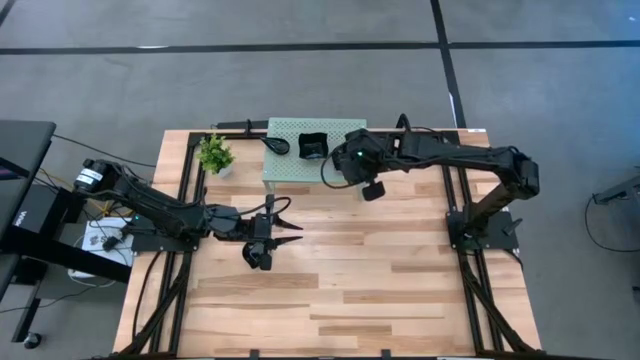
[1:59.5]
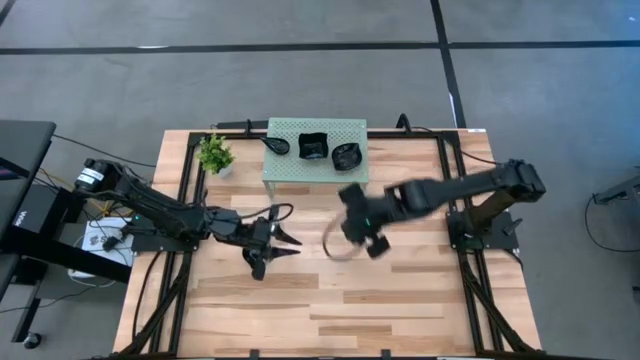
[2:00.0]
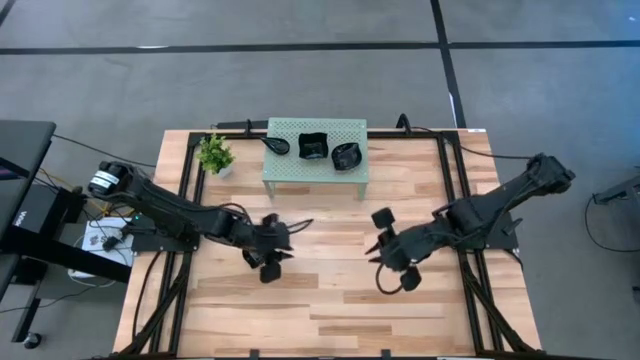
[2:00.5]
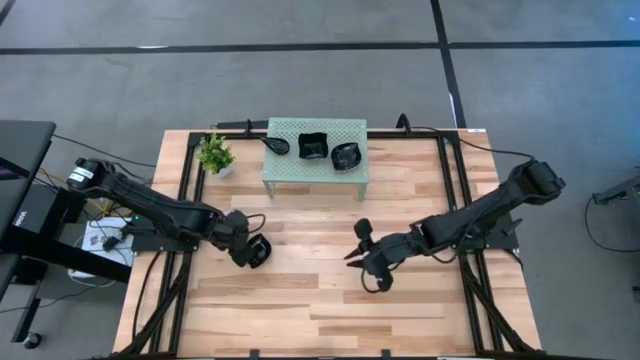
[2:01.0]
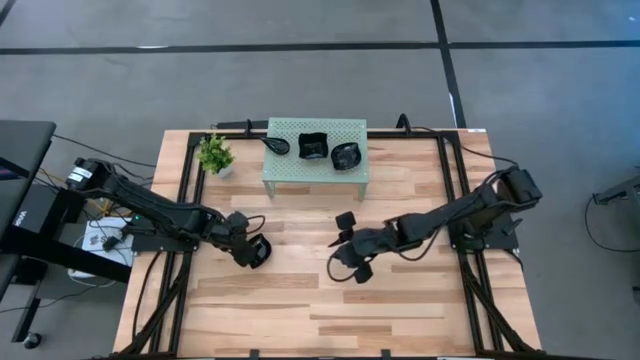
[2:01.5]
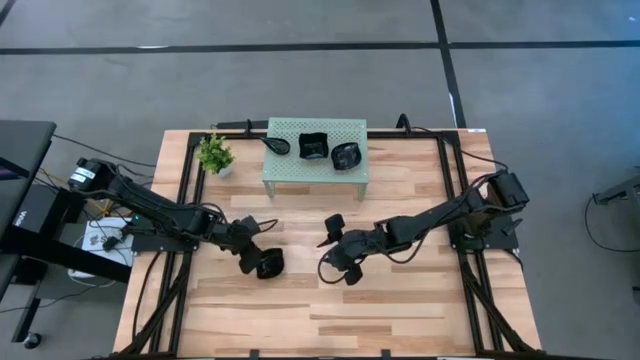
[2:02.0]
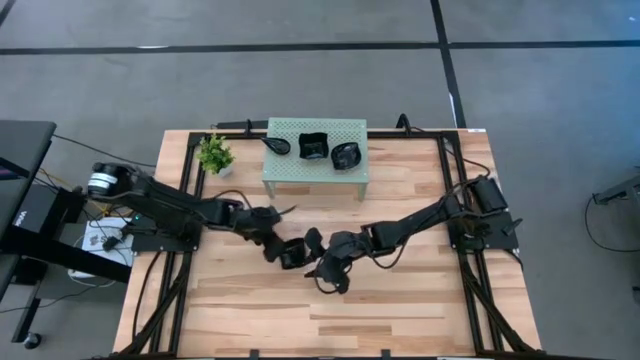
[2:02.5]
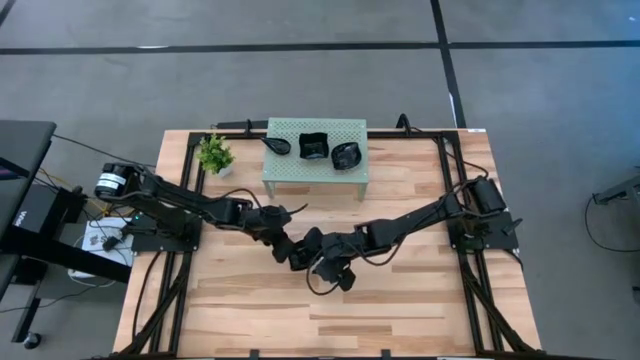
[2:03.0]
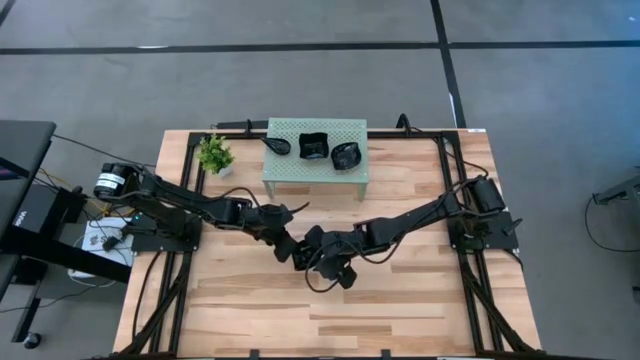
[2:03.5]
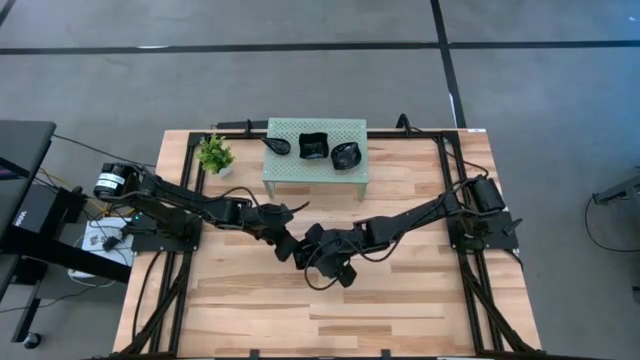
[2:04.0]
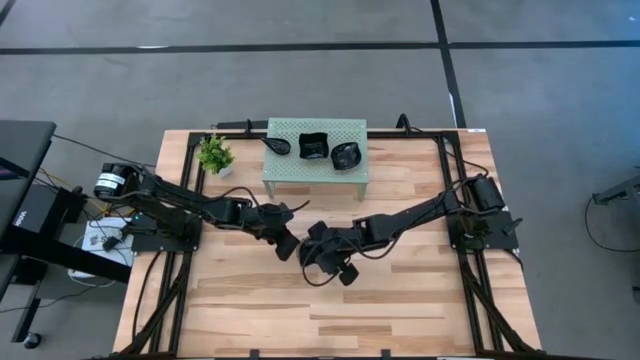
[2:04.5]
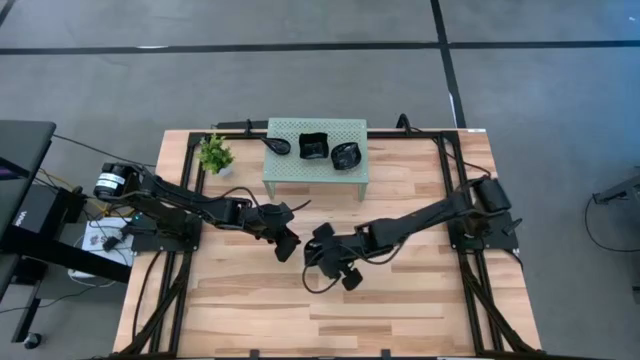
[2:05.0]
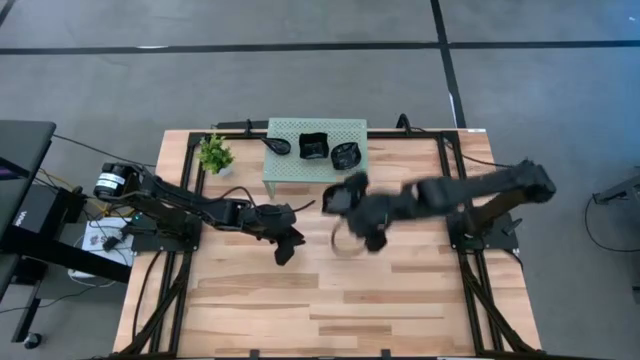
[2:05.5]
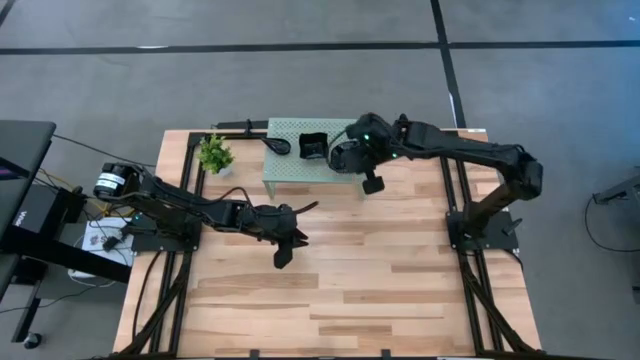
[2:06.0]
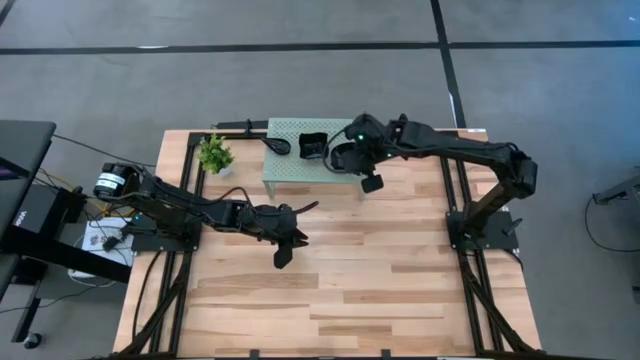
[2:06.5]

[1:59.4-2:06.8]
Task: Pick & Place Mini shaped plates
Stack the leaf shaped plate on top of the other leaf shaped plate on the shelf

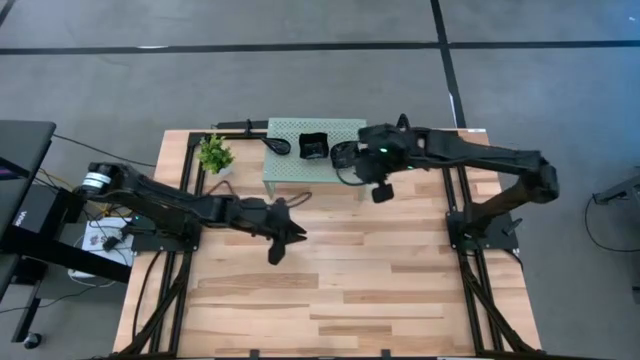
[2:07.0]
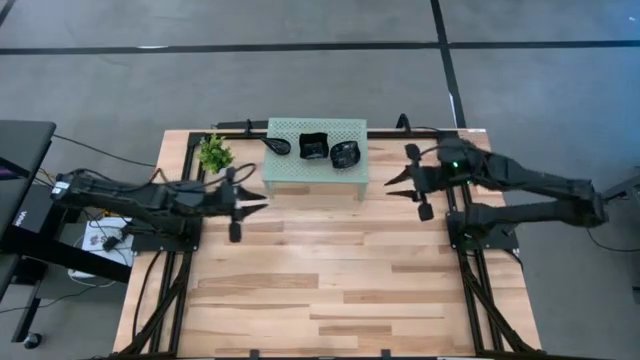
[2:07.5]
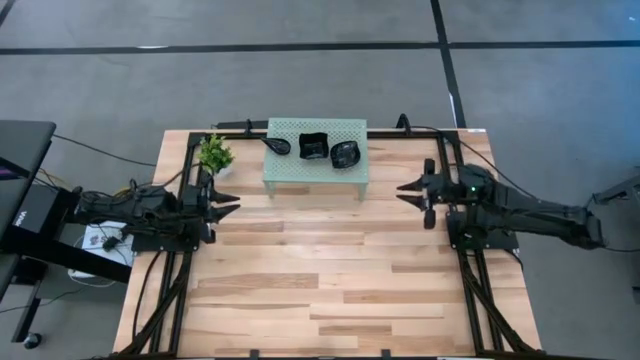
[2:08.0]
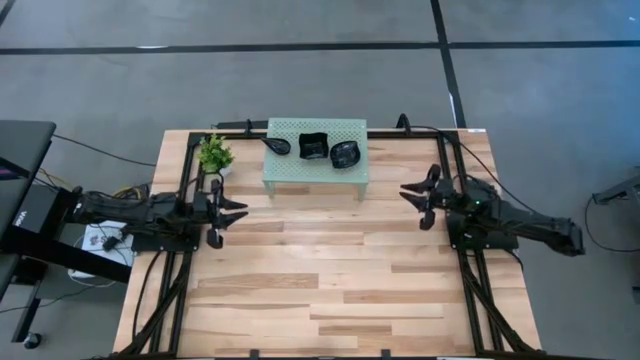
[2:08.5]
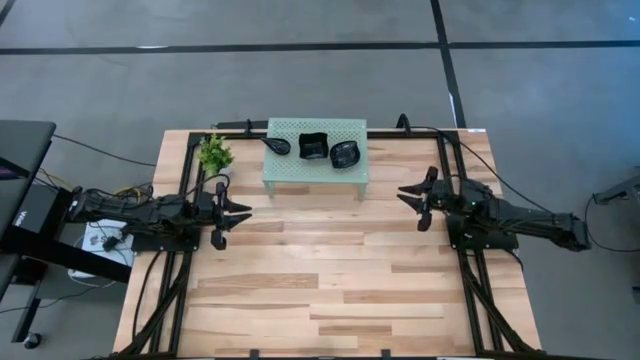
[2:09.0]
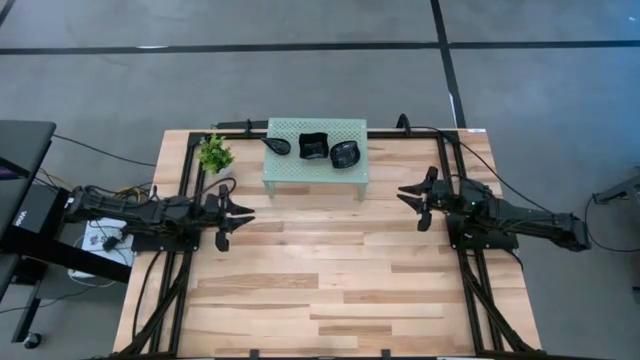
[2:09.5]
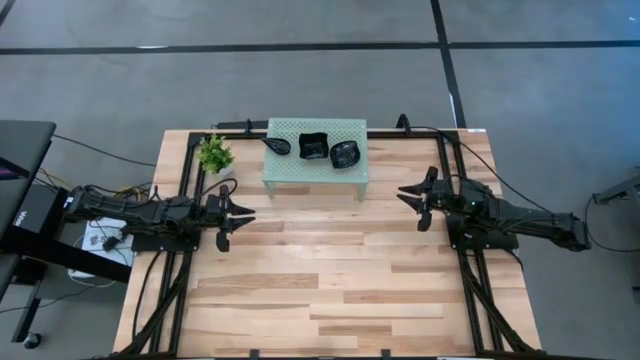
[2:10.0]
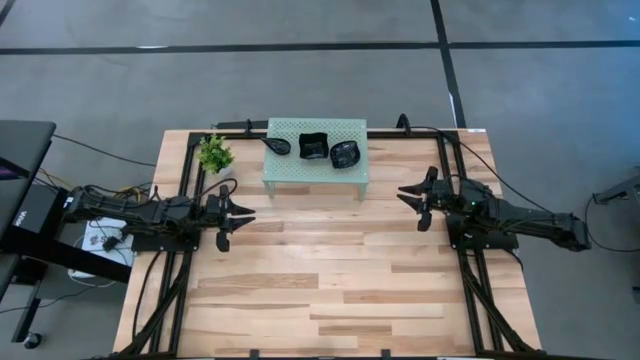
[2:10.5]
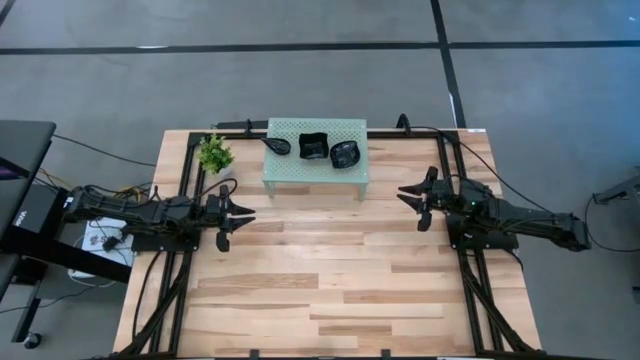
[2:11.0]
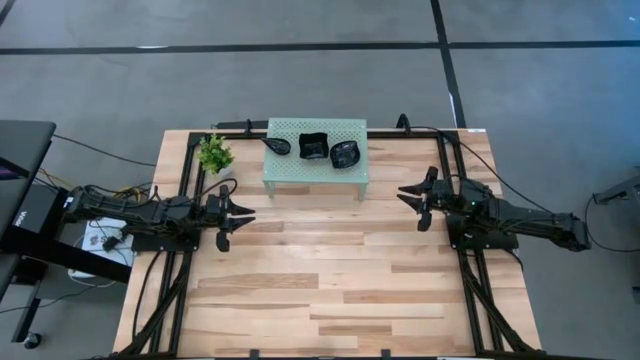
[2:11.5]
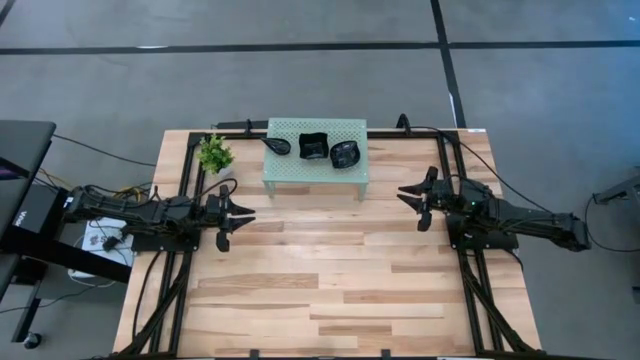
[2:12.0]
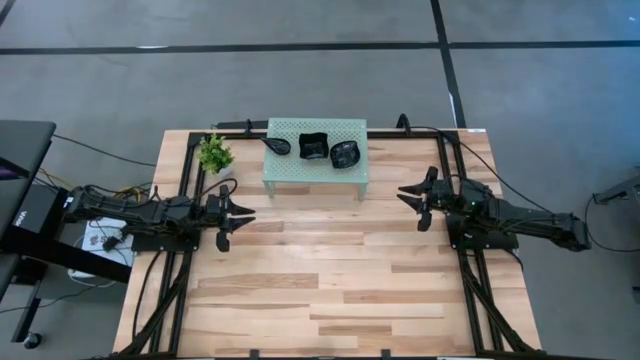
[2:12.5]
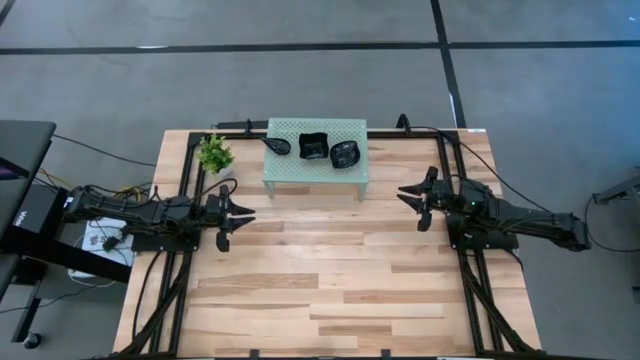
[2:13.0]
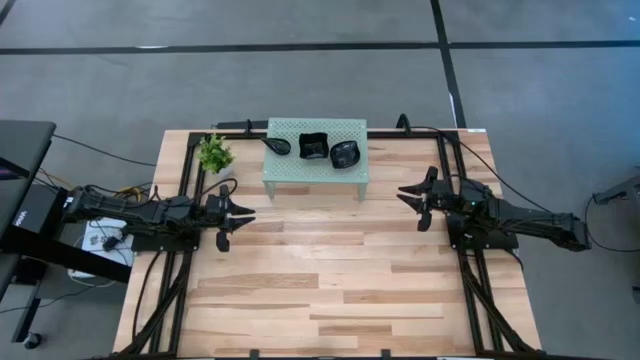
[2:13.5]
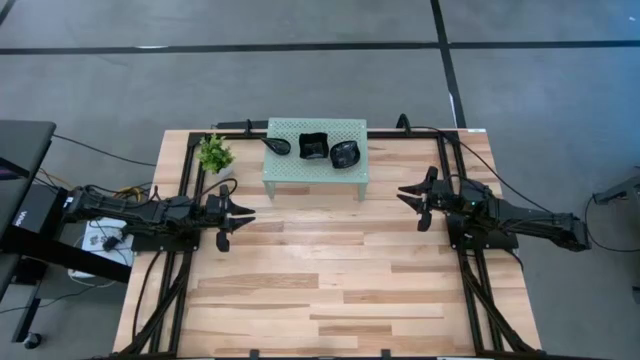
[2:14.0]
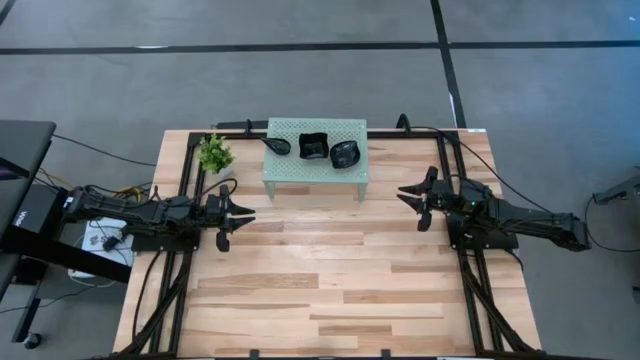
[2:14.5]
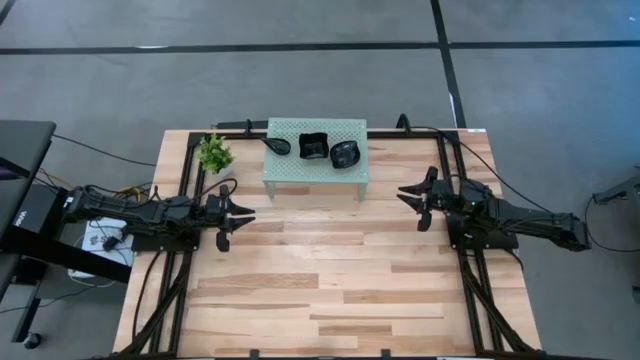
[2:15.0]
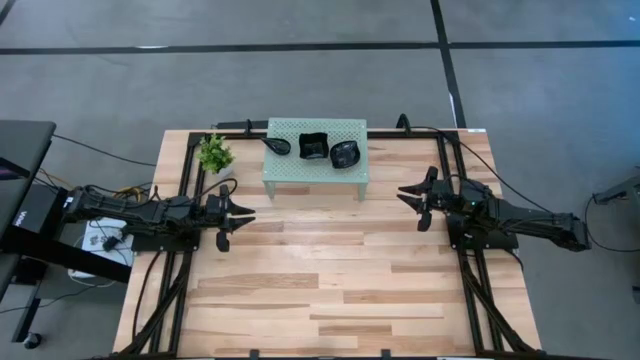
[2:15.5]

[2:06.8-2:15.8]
Return to Home Position

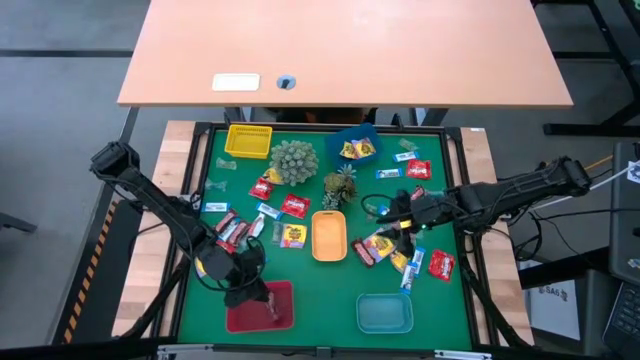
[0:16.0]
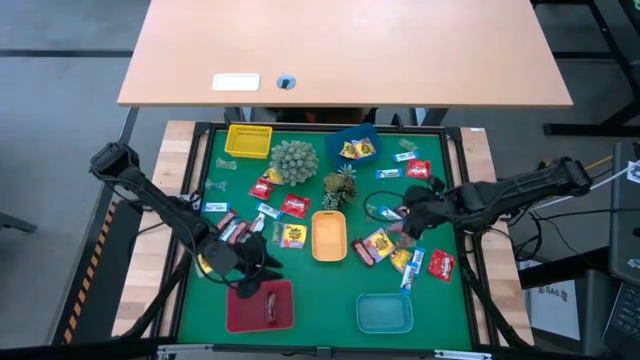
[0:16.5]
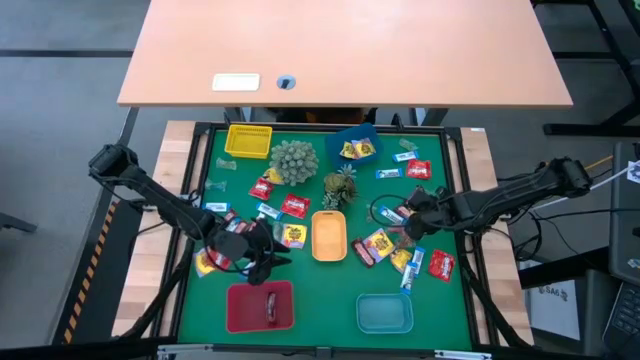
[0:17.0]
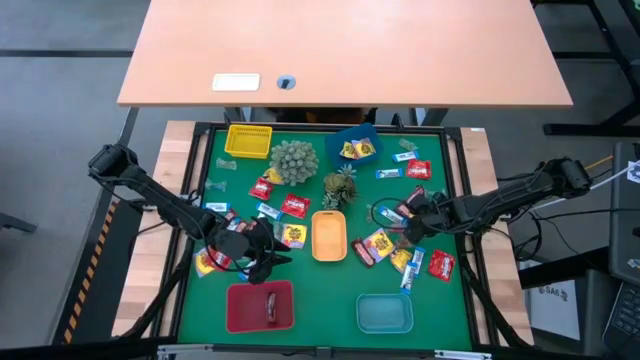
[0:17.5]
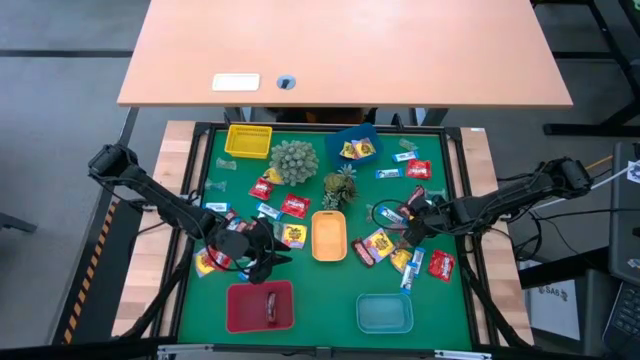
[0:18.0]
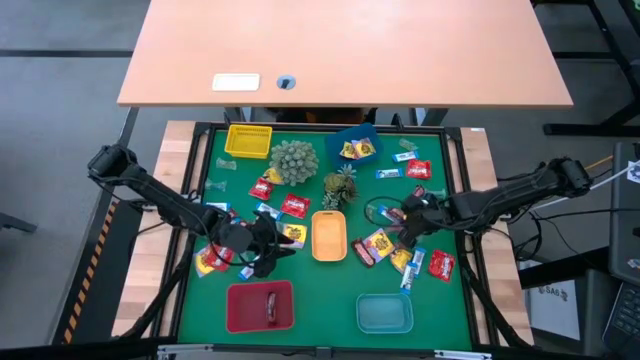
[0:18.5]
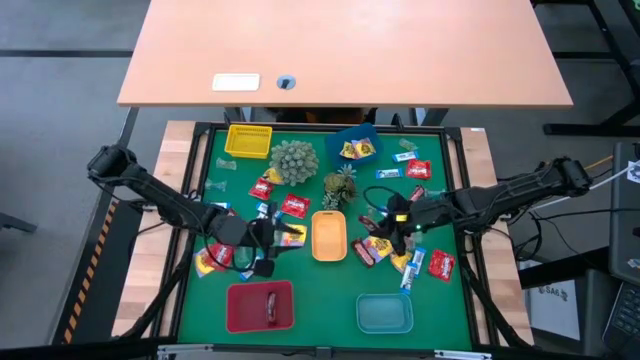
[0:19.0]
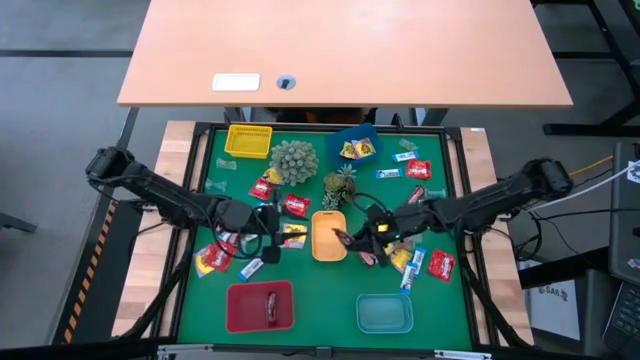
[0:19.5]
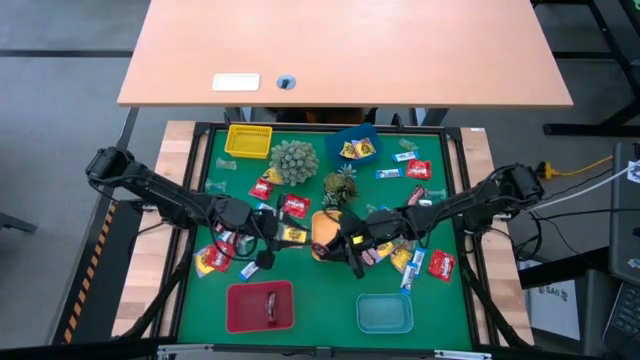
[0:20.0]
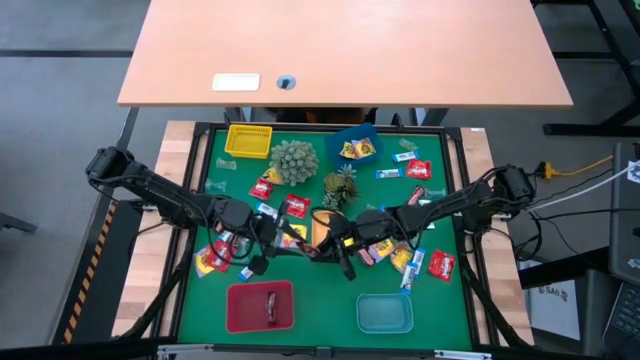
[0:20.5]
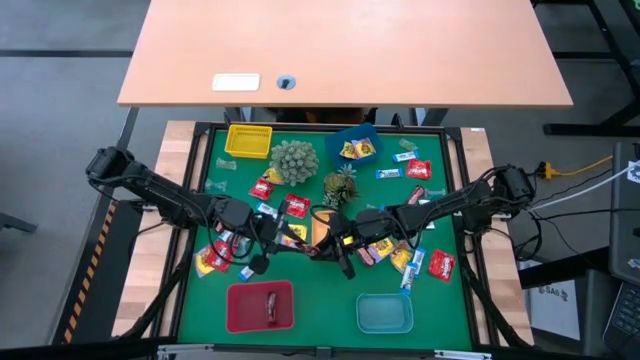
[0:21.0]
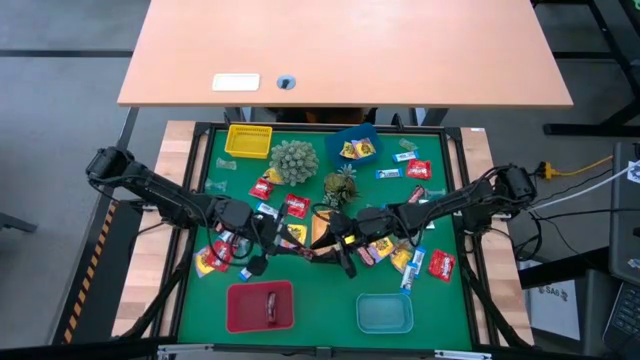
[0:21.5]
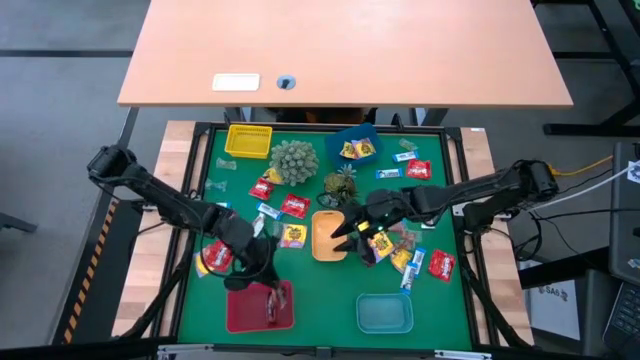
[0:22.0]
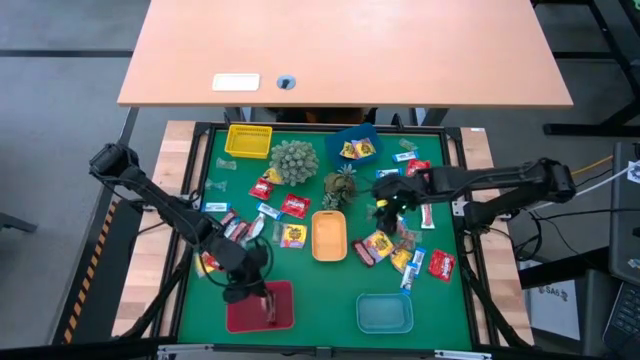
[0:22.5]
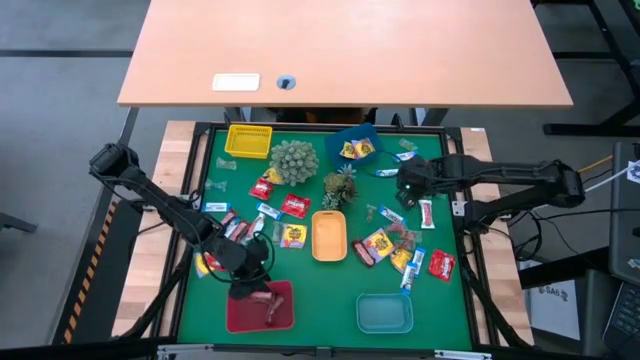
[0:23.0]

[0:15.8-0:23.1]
Task: Sort candy
Put the brown chocolate bar into the red bin
